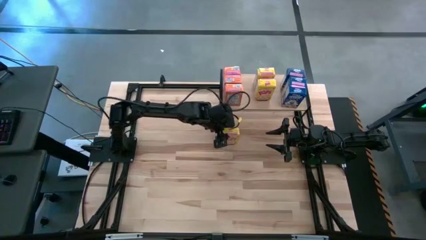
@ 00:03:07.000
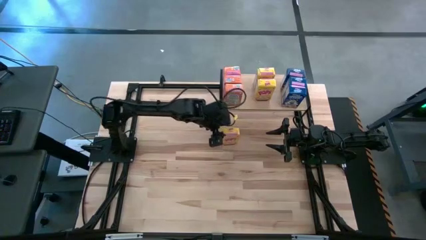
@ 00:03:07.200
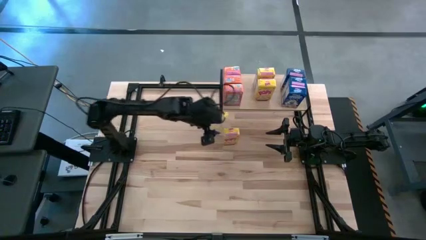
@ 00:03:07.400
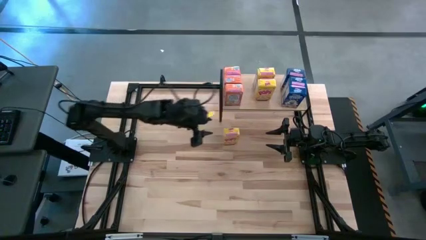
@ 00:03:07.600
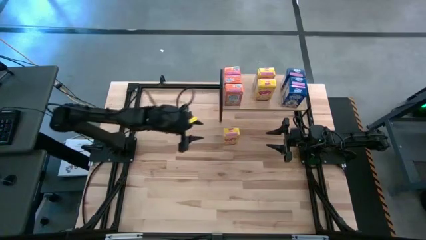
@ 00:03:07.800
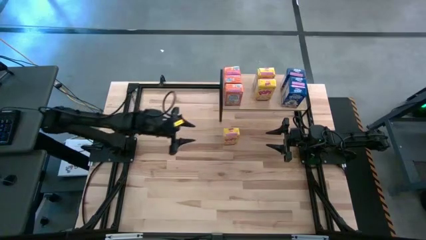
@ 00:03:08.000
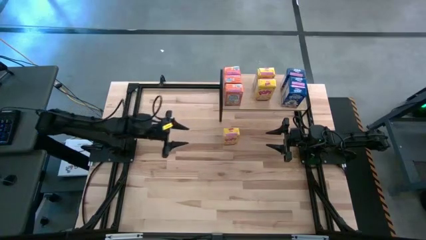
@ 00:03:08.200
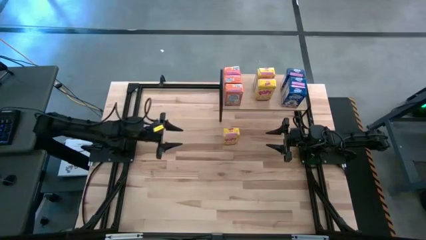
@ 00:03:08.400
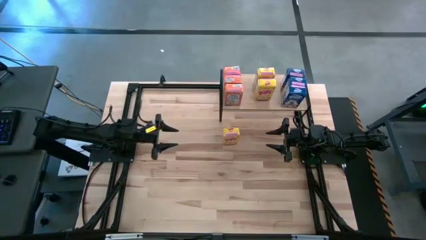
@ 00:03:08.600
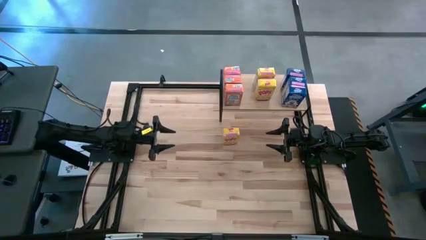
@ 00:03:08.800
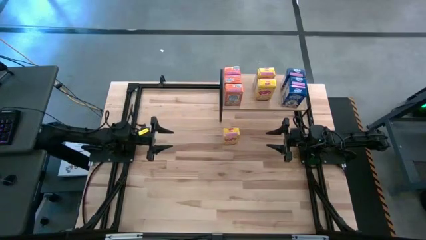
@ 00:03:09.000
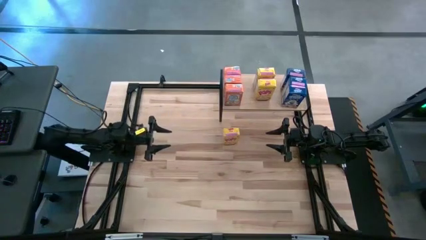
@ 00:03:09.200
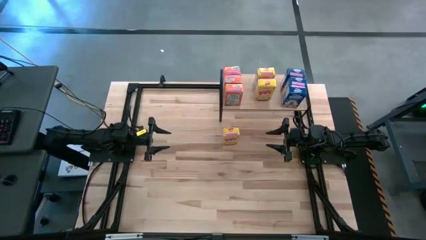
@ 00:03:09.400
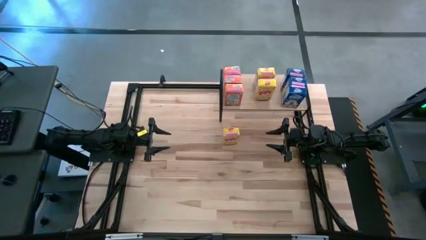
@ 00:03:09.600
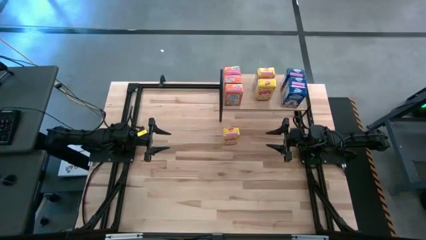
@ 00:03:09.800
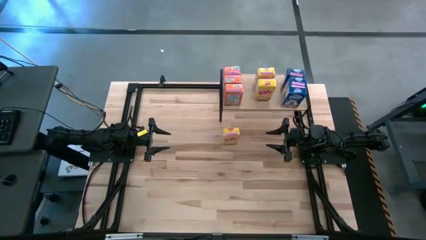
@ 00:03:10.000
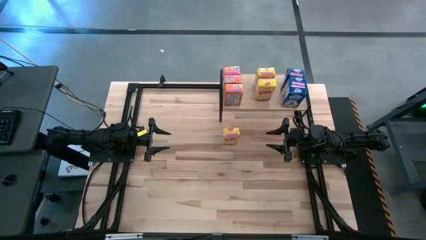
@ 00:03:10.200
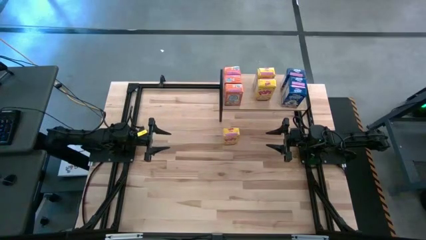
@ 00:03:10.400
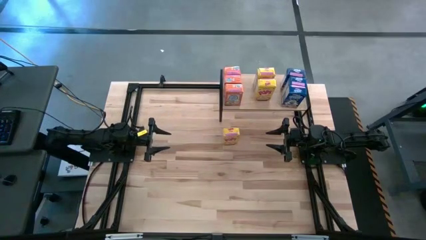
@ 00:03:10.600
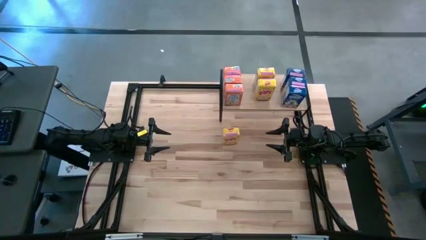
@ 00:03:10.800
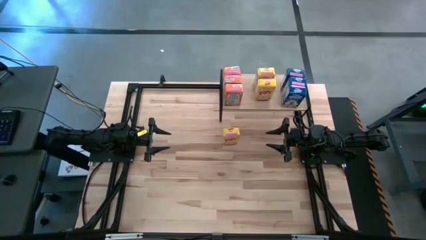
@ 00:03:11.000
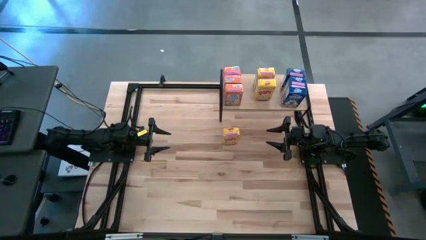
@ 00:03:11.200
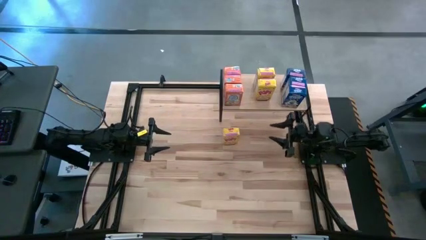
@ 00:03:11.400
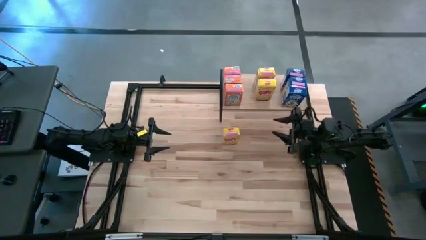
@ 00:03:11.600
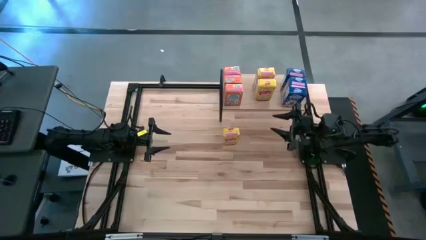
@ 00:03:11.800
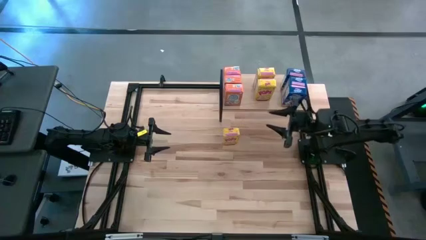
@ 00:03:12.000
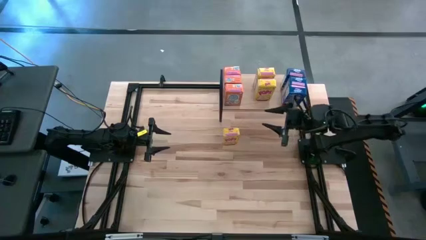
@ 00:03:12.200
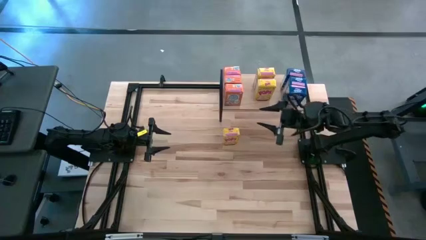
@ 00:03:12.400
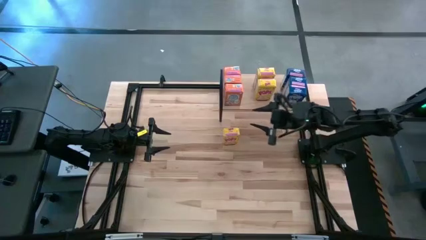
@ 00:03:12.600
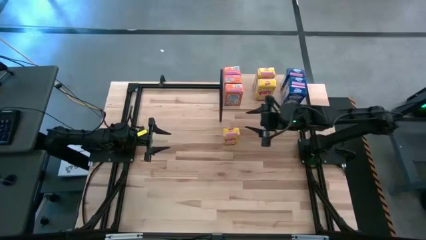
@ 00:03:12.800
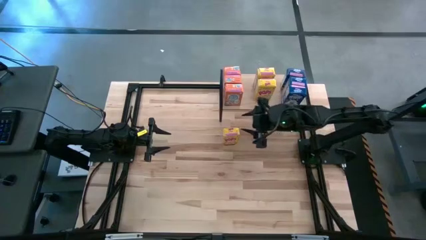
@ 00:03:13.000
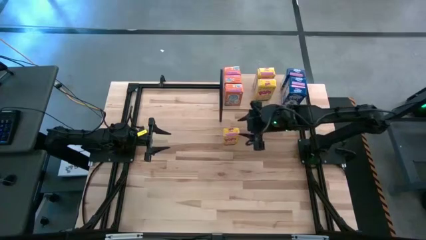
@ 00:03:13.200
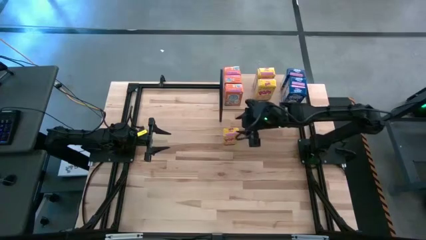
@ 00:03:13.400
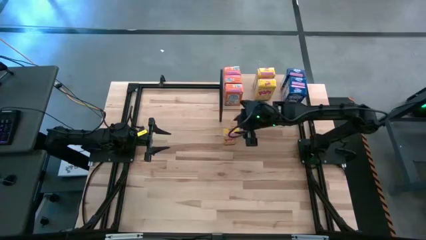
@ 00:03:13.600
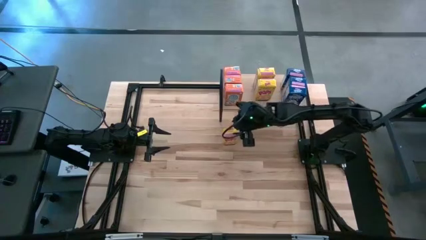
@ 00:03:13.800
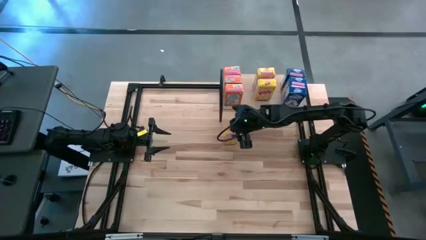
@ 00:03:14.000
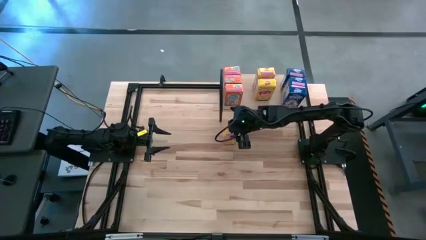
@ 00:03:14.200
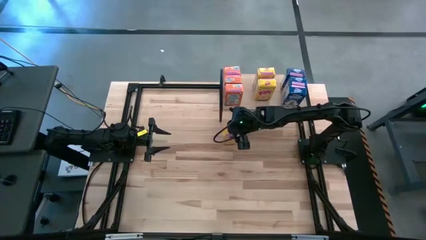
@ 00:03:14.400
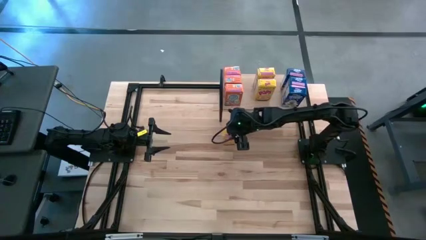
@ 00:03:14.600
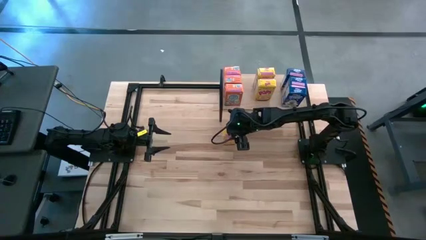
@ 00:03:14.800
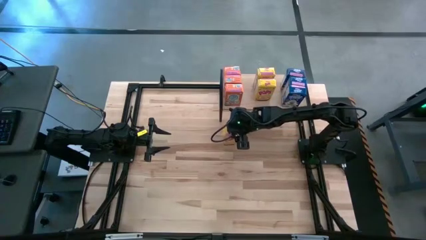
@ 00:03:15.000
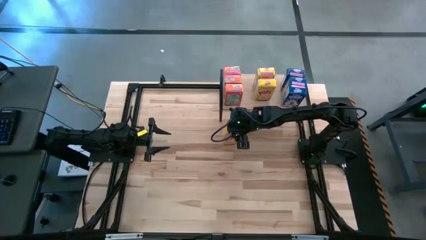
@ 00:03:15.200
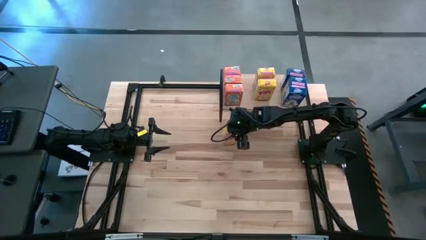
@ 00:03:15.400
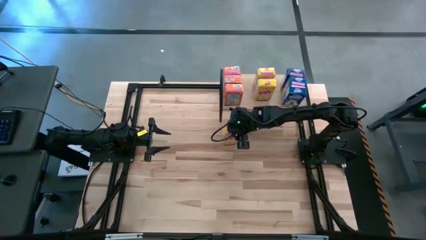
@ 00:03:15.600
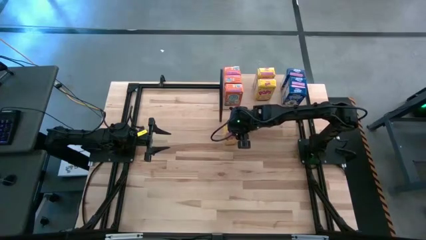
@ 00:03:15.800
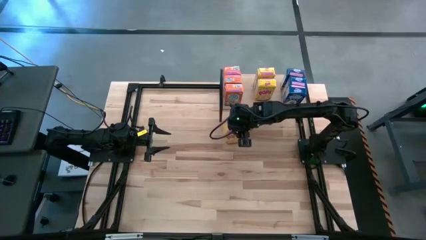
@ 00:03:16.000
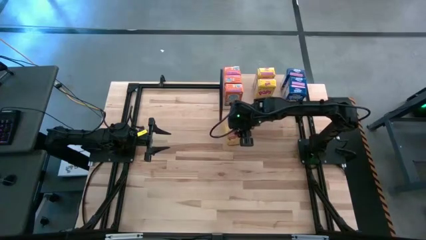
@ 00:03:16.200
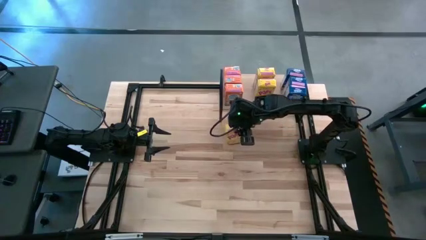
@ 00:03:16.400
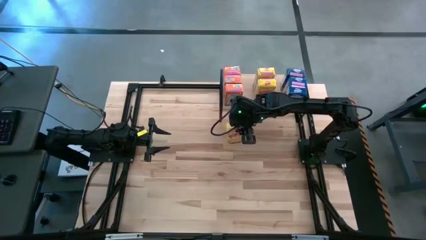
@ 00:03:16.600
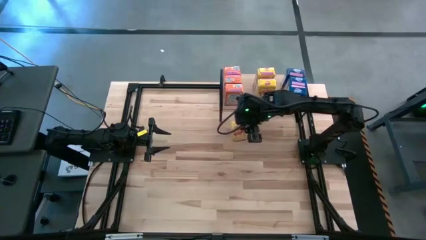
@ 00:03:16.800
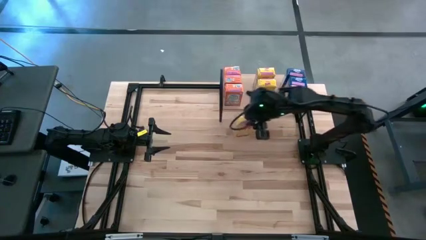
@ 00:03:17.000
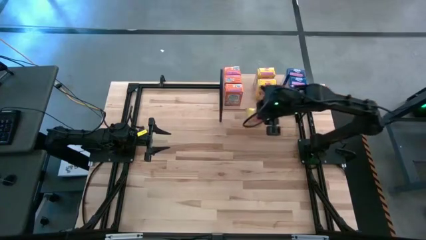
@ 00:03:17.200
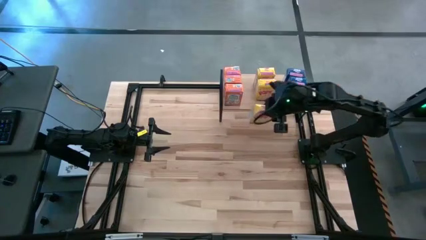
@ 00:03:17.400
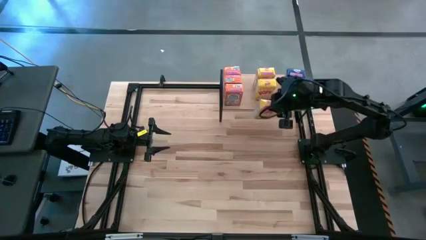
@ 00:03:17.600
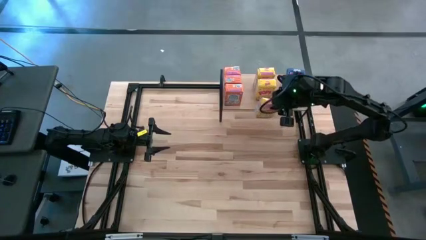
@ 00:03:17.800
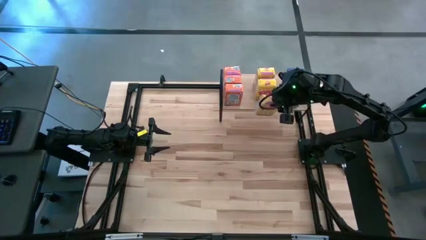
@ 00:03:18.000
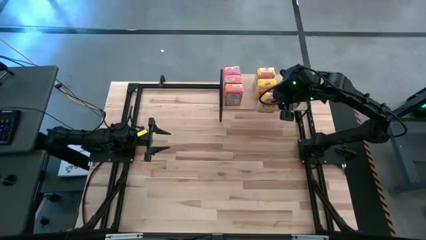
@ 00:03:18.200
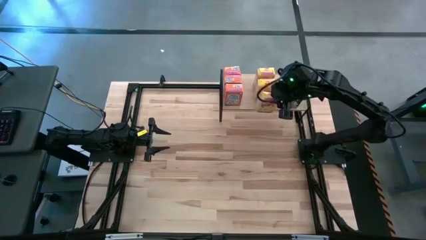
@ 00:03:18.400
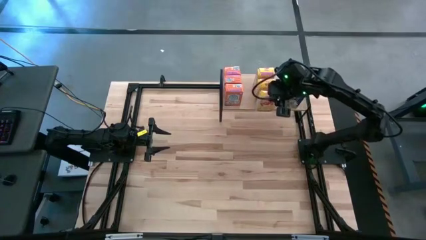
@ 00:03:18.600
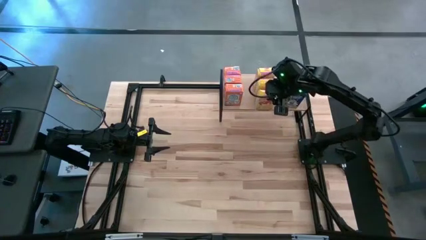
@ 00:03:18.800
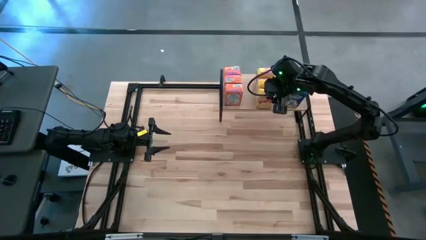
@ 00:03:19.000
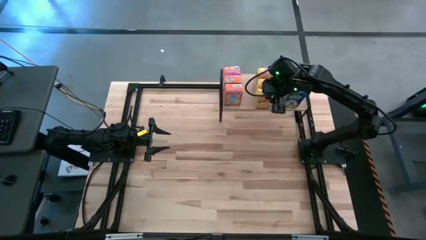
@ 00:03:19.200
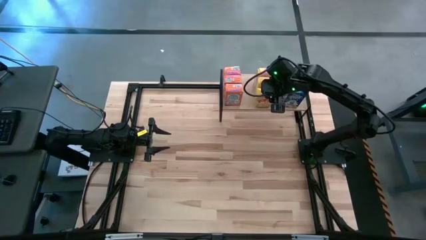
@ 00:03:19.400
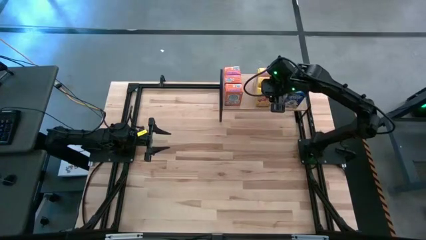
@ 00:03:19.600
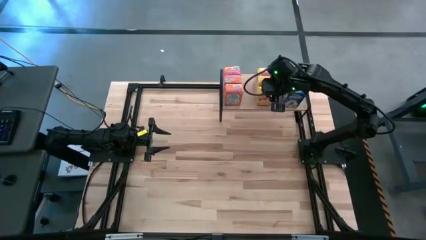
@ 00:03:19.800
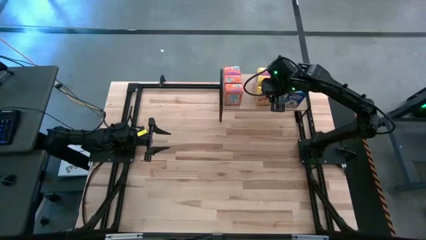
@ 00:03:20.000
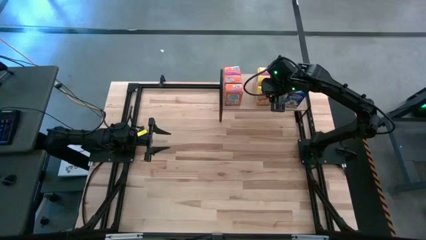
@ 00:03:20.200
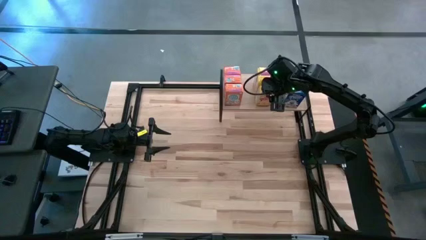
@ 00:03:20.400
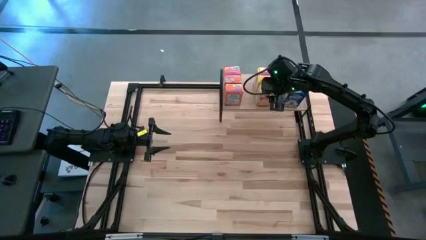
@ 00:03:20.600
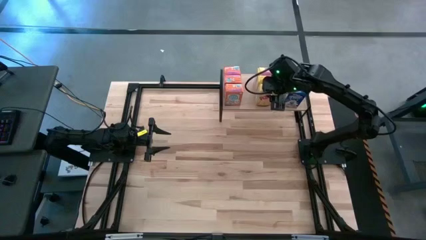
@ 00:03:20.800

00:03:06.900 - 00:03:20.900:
Task: Stack cereal on shelf
Put the yellow cereal box on the shelf aligned with the yellow cereal boxes

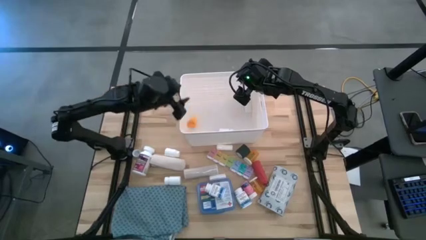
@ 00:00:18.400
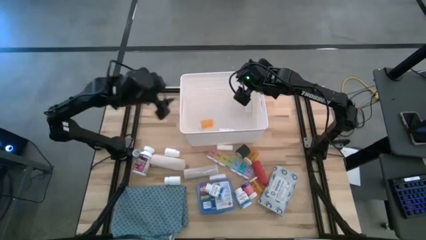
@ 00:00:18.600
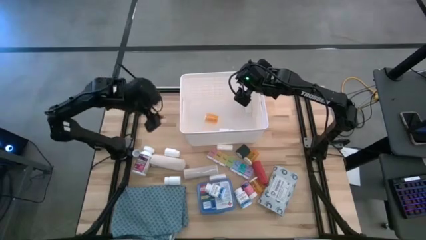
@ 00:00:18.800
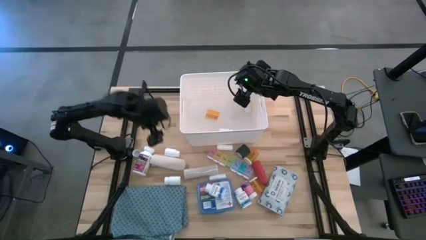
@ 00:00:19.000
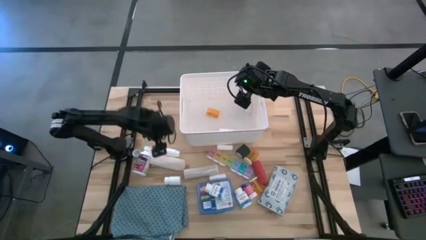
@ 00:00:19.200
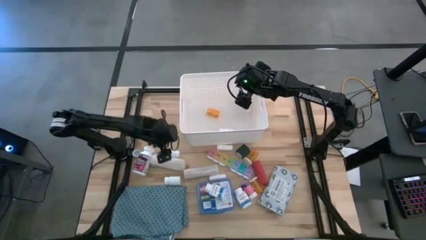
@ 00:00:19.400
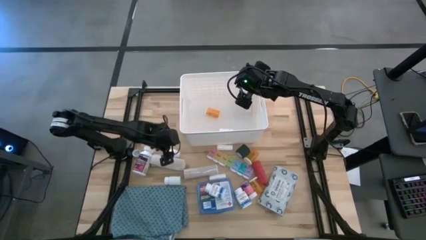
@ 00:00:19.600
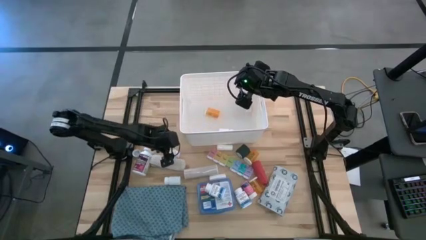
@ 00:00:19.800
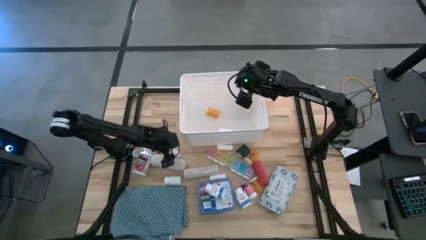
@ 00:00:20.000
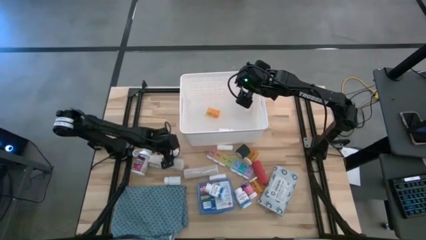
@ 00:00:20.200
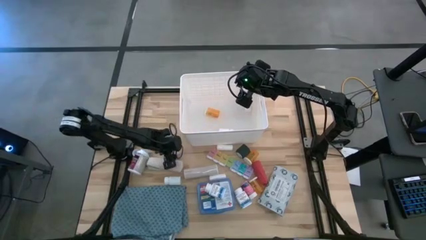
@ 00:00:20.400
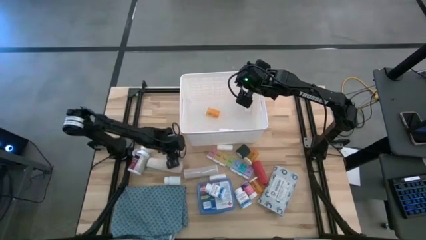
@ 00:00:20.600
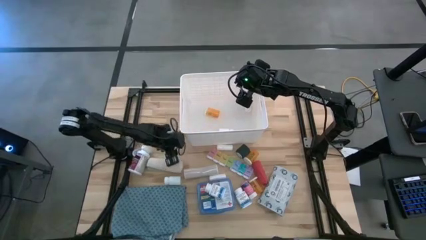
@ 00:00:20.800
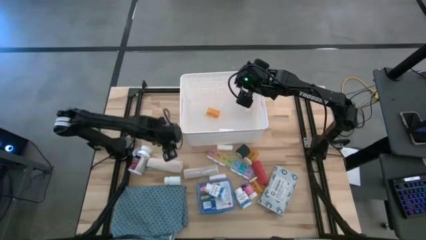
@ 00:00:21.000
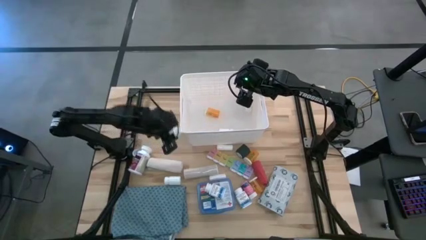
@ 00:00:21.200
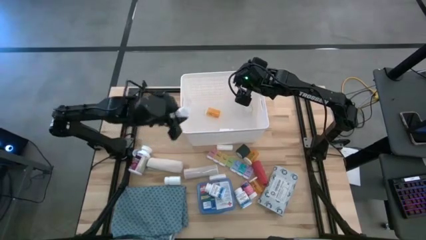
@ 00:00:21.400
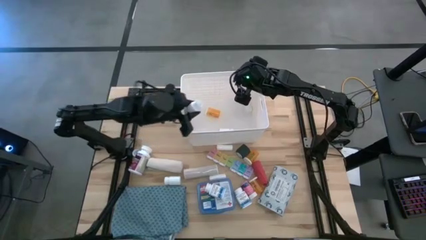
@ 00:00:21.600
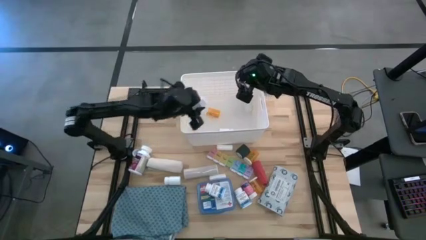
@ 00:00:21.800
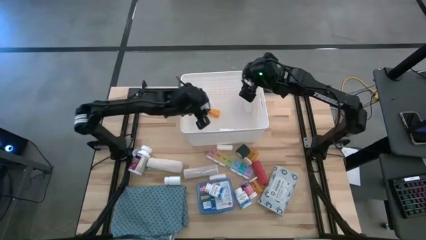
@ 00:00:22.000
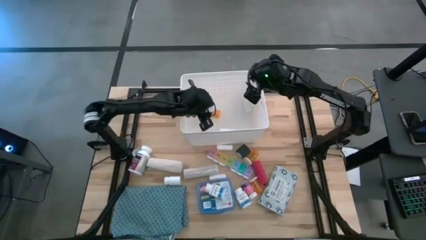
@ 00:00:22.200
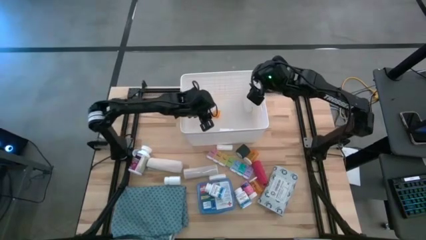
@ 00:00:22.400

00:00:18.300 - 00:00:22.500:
Task: Pick & place medical supplies in basket/bin
Put the white medicine bottle into the bin
